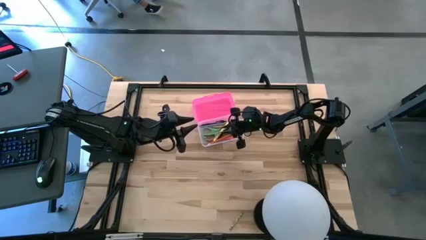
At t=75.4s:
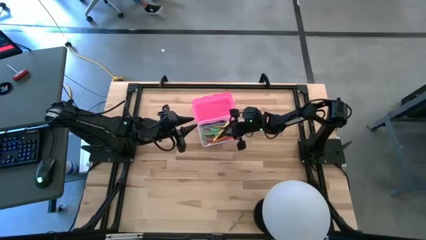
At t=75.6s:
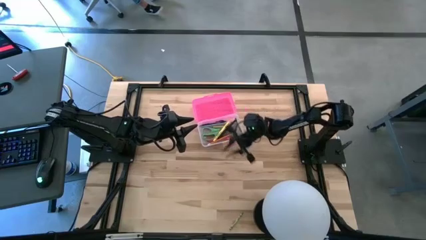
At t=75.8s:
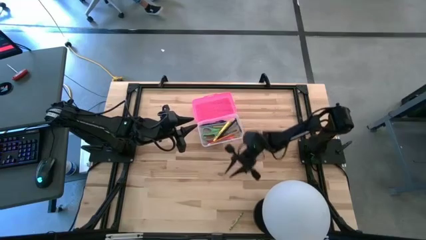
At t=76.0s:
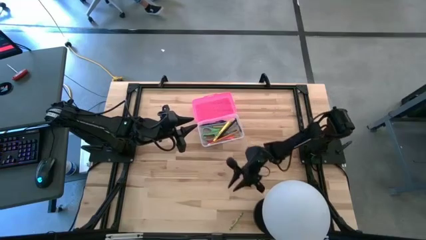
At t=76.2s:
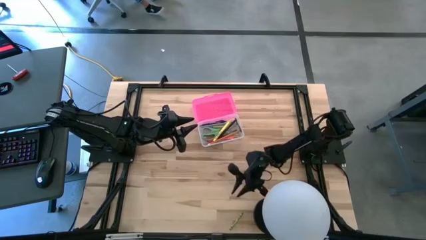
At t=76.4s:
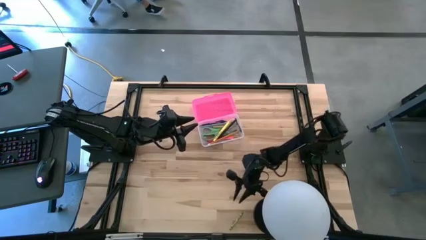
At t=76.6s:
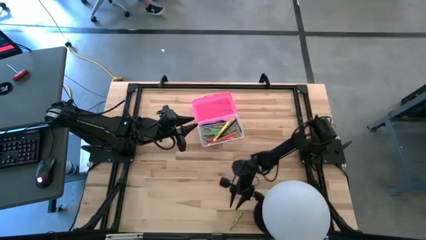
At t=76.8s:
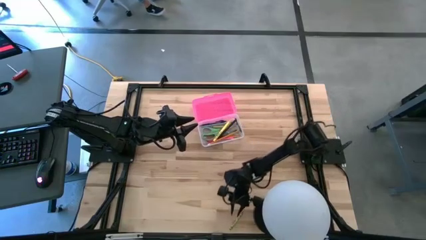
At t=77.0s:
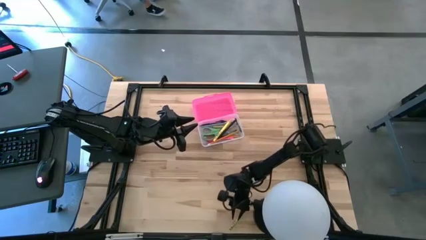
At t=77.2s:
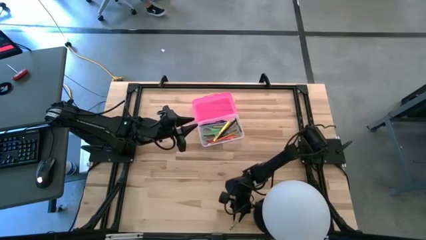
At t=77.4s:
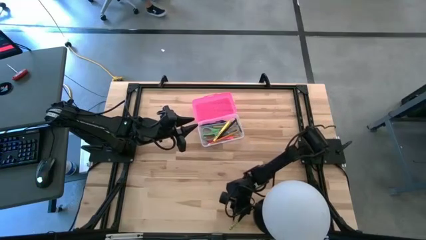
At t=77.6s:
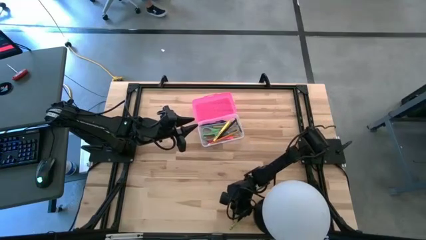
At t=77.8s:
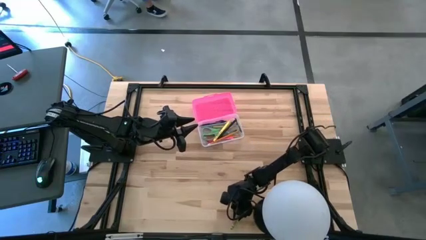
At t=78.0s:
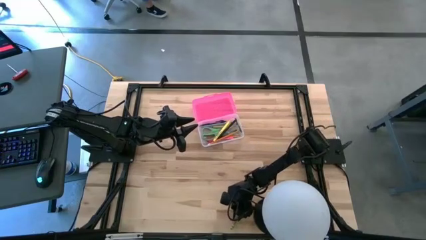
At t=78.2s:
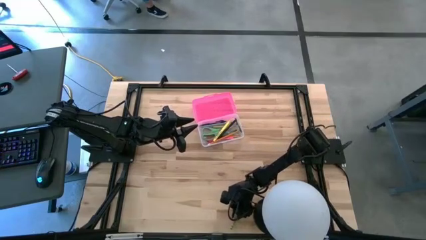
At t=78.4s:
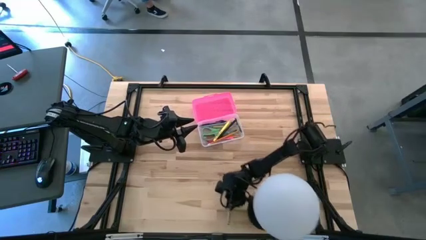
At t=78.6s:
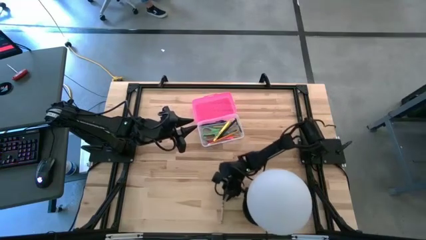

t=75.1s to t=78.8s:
Task: Pick & place school supplies into a supply box
Put the green crayon into the pink supply box

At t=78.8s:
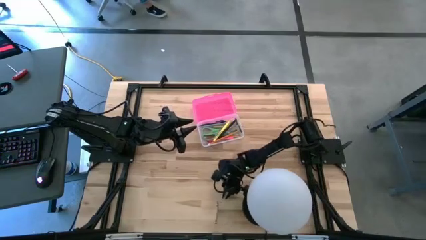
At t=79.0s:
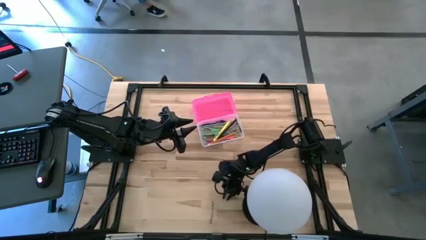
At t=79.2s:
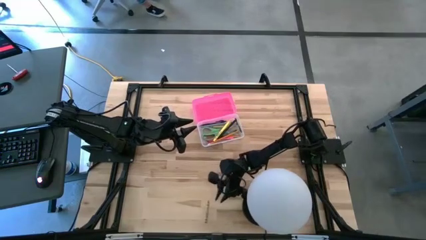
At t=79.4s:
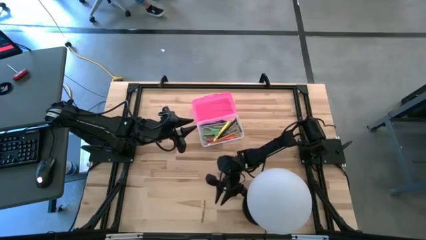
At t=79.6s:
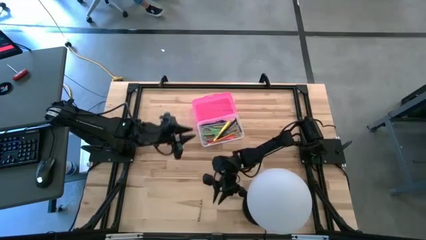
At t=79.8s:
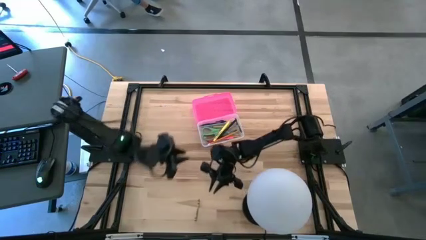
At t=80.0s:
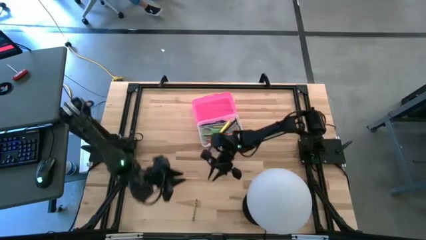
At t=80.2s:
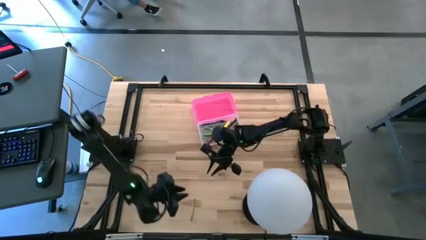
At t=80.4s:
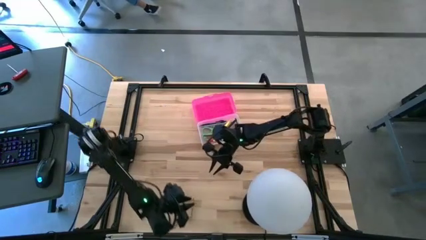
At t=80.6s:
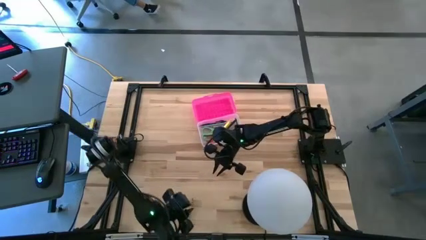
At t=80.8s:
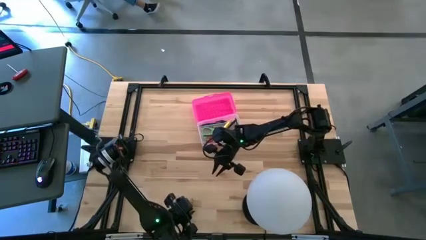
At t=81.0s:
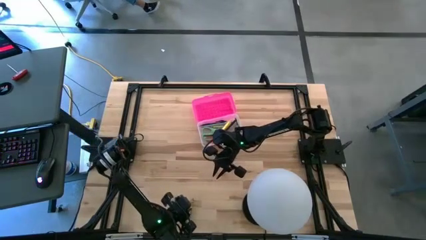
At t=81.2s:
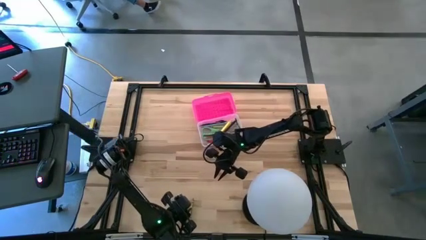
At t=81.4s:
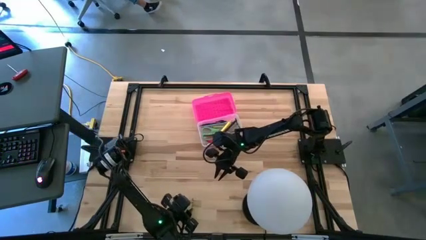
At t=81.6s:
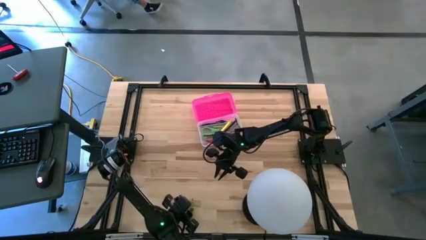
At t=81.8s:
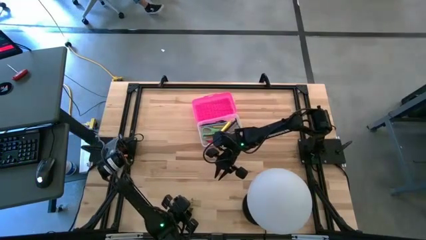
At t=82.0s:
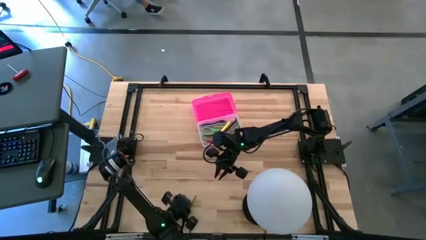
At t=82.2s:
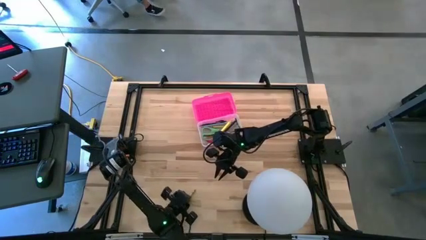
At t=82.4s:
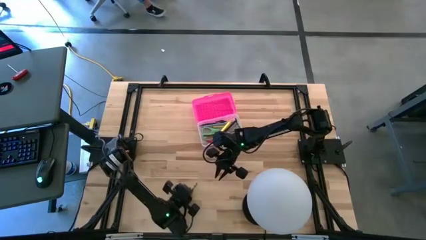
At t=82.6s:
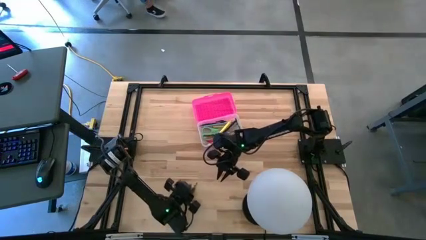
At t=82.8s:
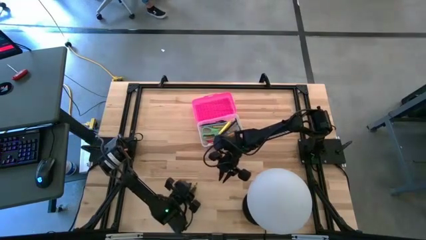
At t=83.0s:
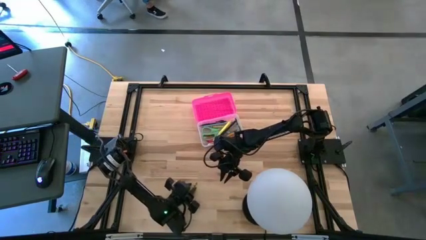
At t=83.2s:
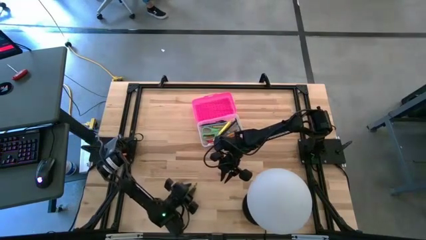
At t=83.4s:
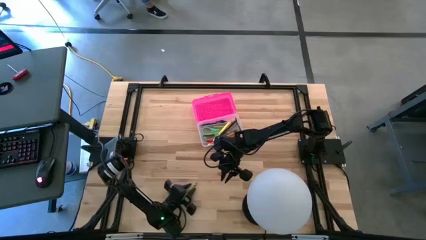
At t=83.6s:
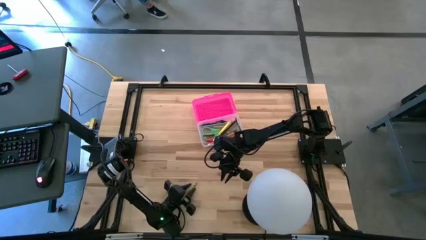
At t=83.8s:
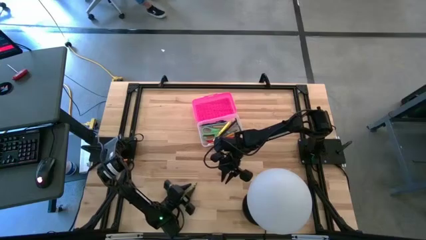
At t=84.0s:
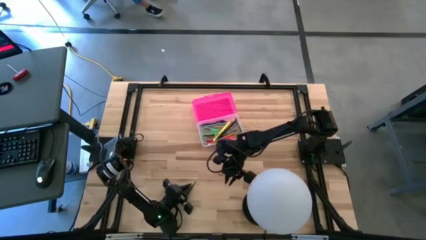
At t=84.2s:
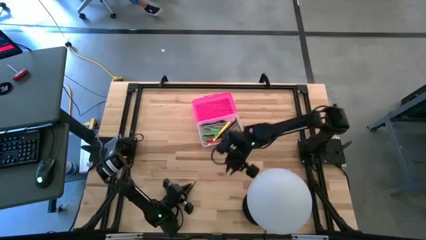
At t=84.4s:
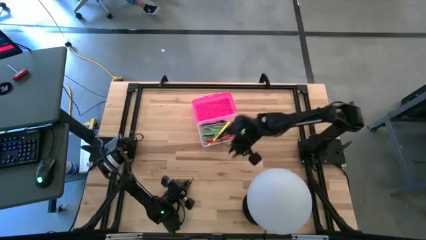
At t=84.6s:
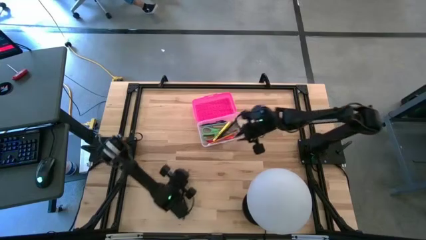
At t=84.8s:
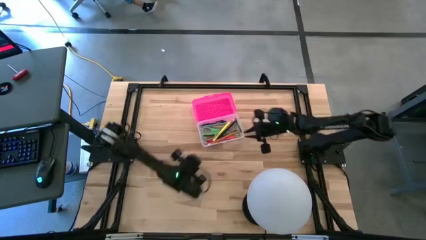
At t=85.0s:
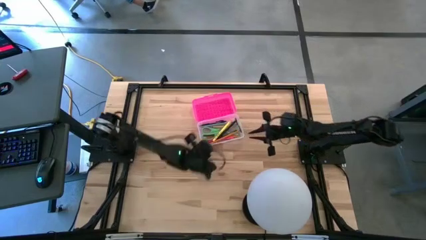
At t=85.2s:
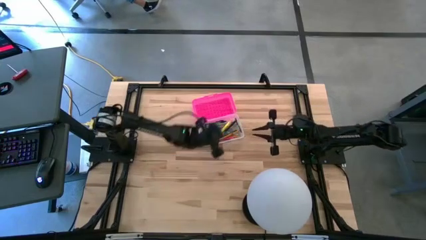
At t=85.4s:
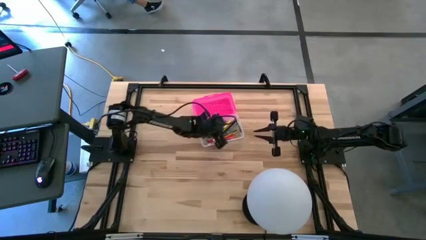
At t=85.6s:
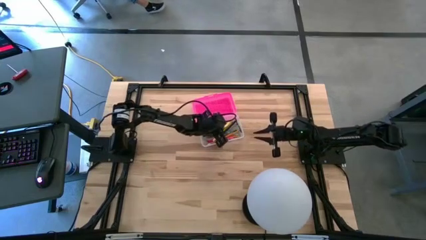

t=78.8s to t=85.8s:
Put the green crayon into the pink supply box

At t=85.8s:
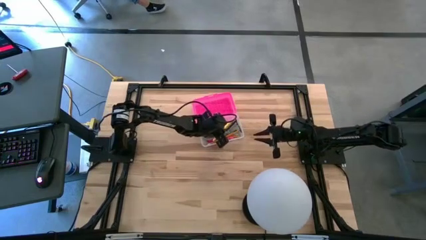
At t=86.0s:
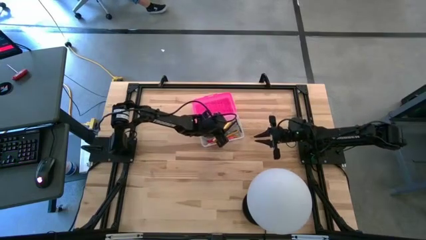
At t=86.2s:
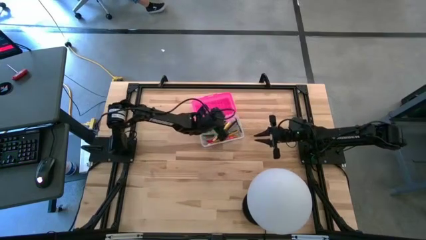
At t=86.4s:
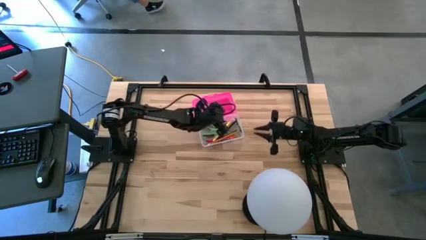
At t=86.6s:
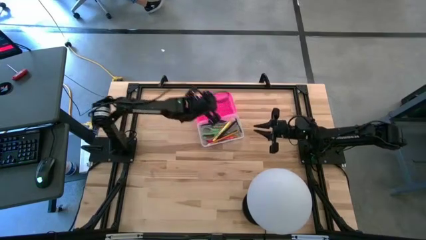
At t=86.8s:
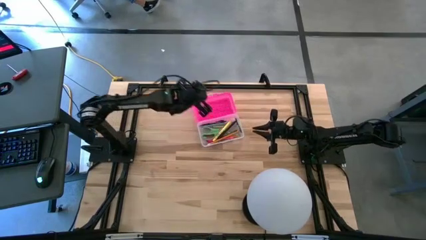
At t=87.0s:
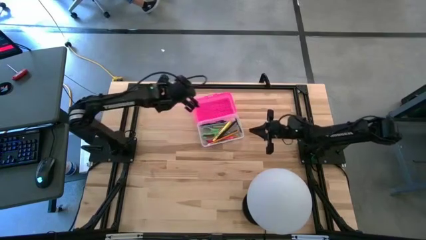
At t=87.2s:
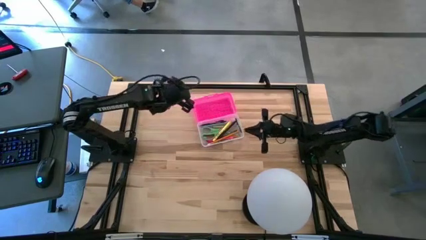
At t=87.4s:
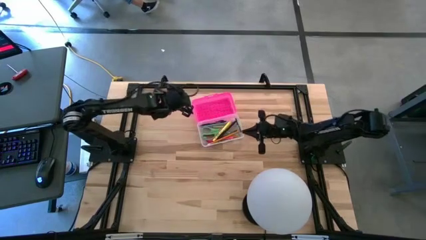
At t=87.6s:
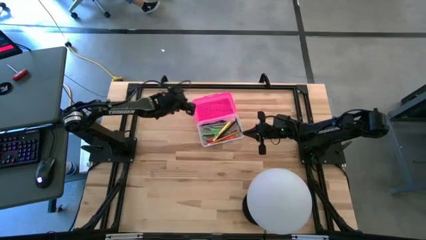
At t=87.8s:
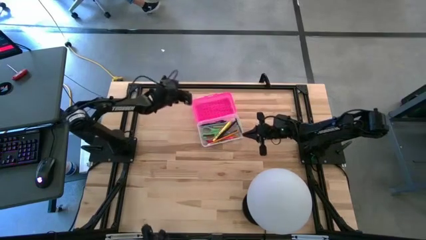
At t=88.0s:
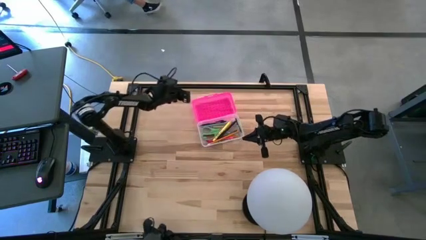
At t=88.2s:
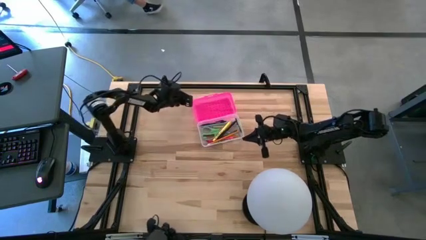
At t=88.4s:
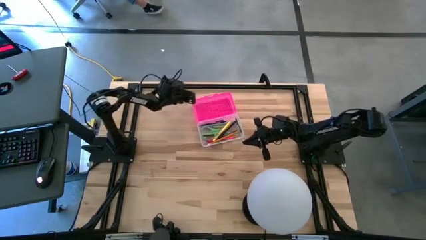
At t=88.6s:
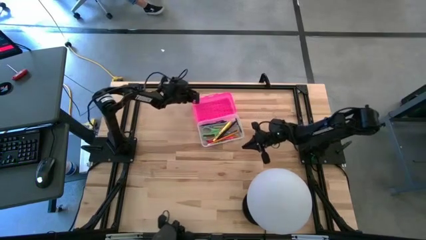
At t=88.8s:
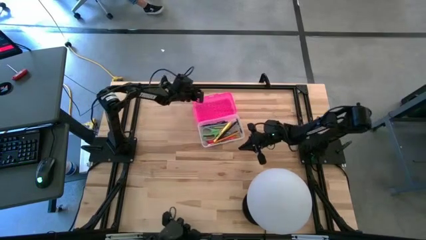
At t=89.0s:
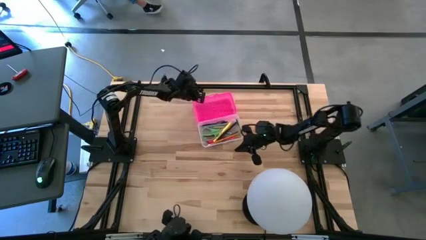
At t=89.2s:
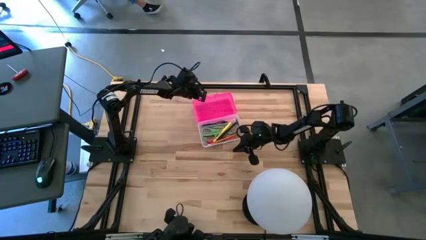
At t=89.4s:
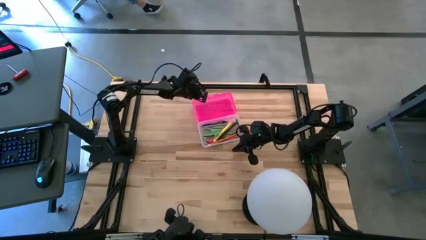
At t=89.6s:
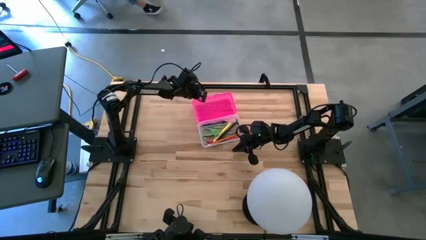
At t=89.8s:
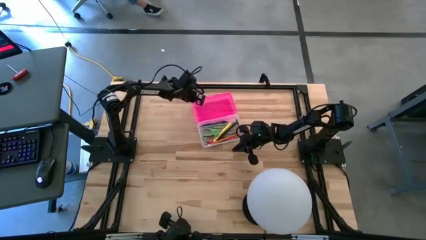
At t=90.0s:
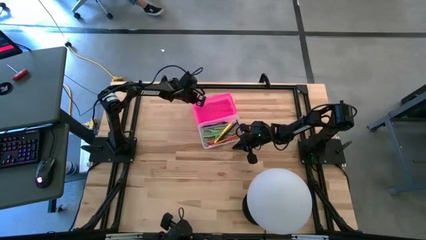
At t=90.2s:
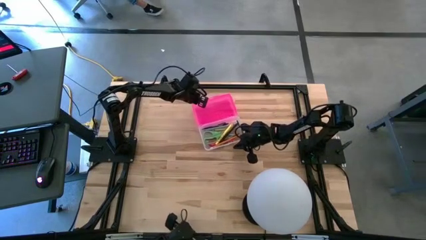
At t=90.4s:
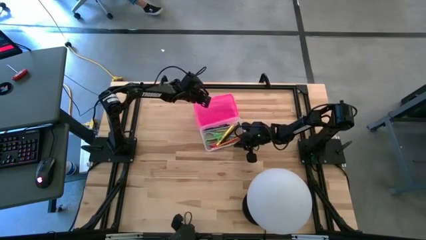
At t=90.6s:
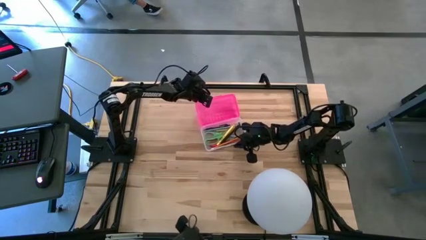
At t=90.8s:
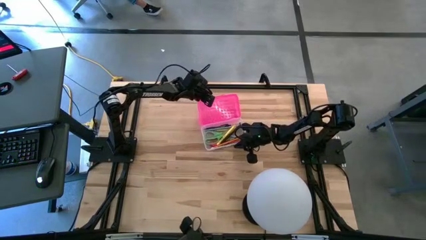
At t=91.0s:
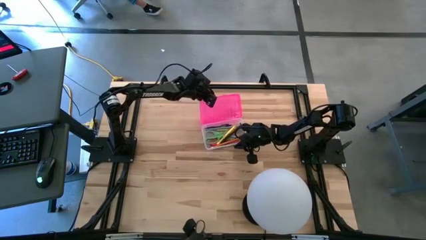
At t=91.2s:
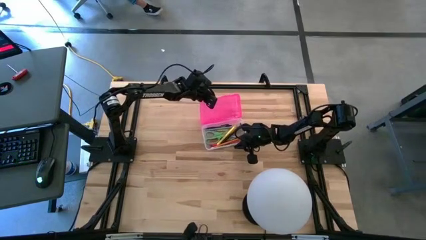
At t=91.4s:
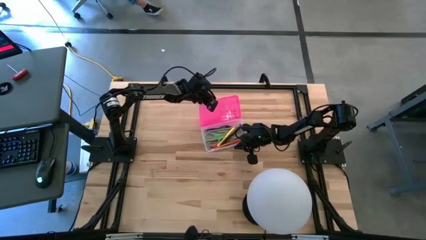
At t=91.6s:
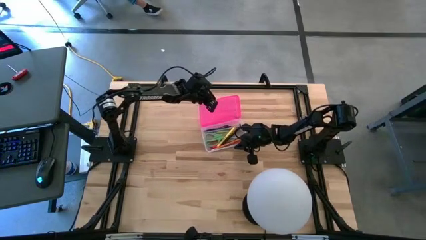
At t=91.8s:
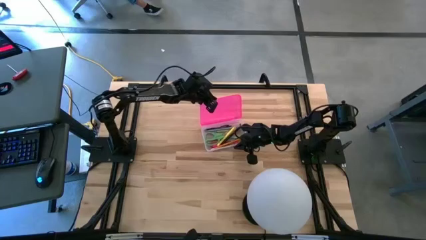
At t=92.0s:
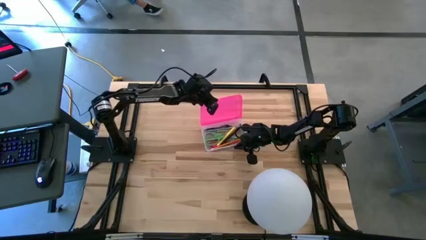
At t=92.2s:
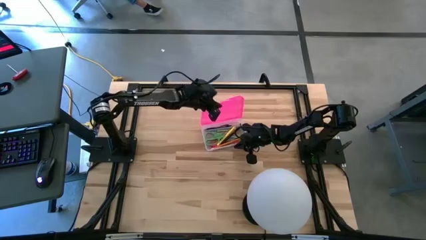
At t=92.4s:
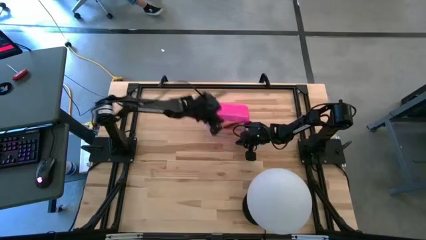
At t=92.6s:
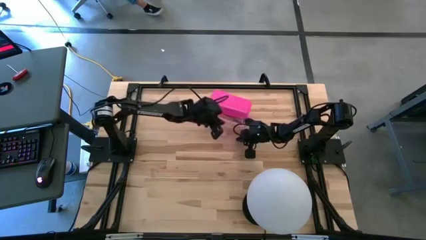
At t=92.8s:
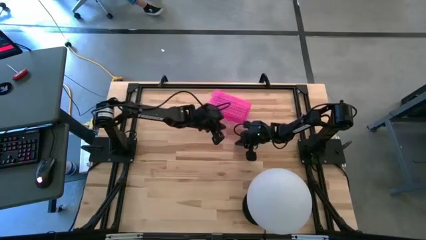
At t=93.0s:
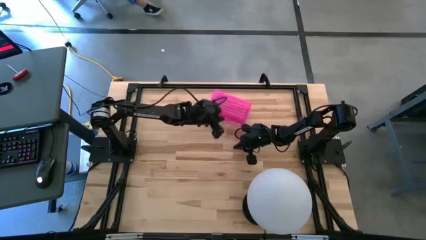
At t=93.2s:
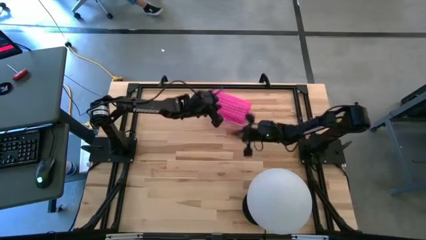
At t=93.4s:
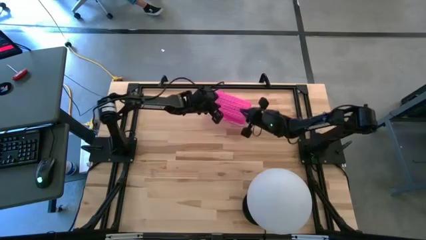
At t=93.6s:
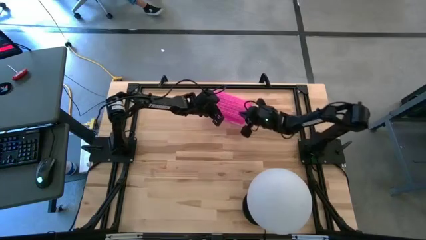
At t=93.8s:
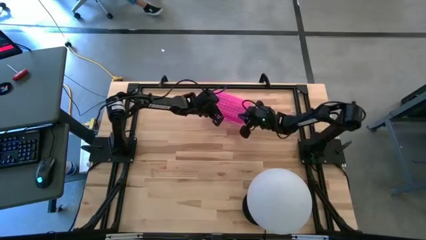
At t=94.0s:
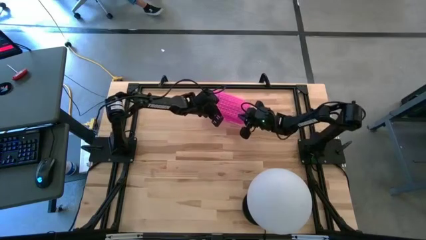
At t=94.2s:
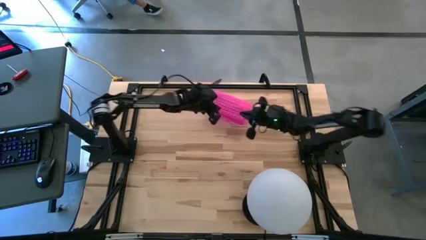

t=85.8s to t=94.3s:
Close the pink supply box
